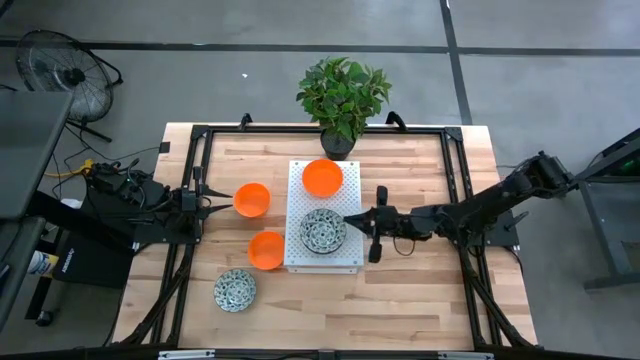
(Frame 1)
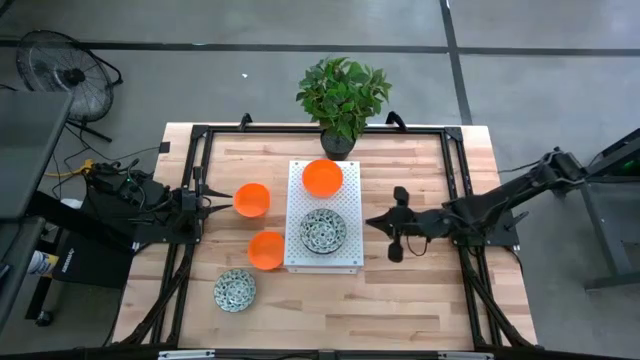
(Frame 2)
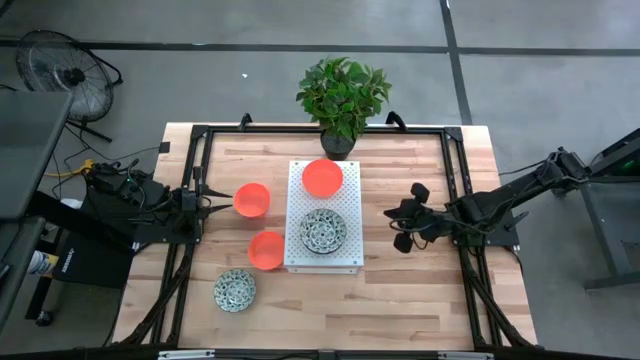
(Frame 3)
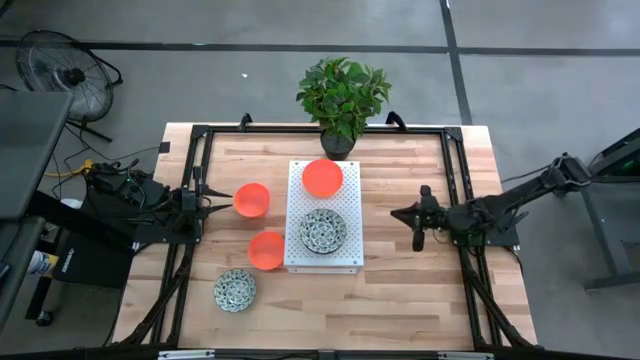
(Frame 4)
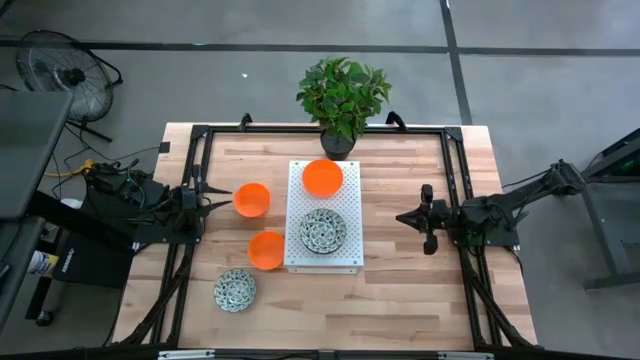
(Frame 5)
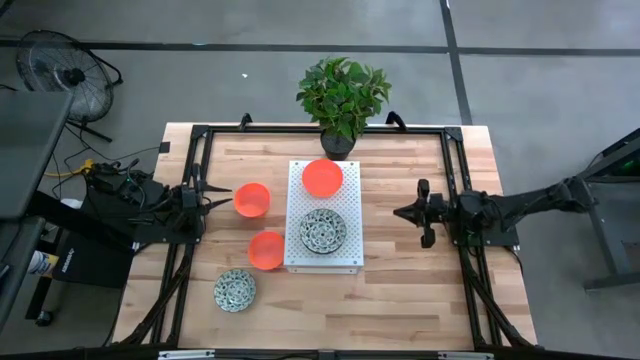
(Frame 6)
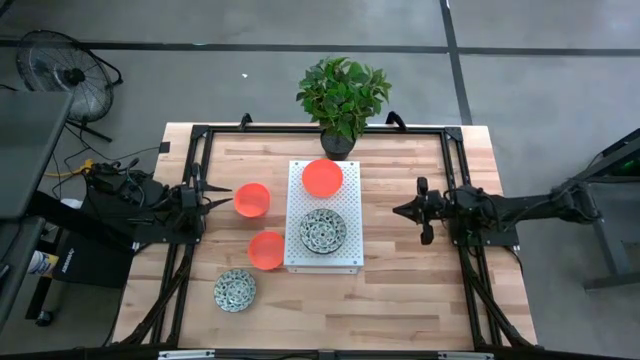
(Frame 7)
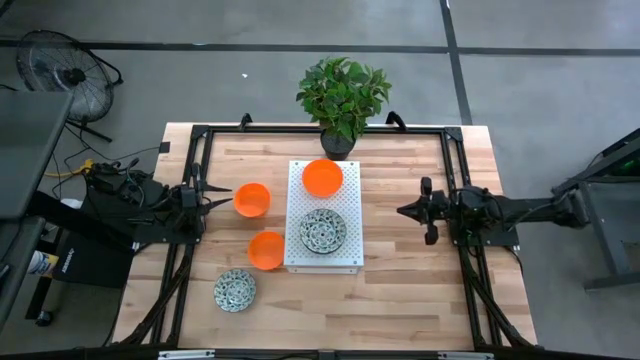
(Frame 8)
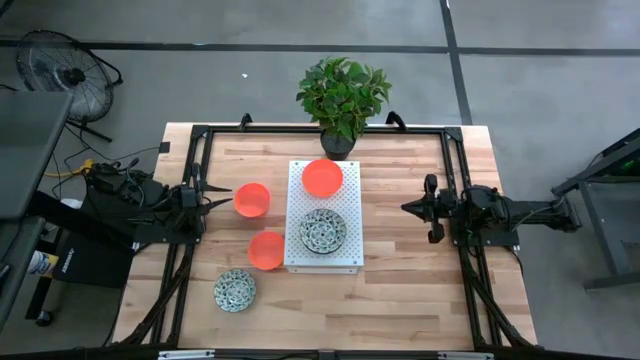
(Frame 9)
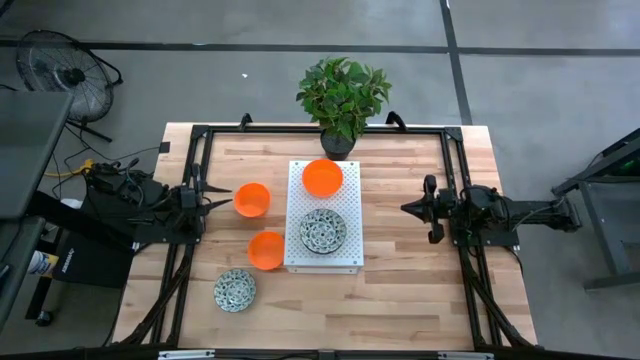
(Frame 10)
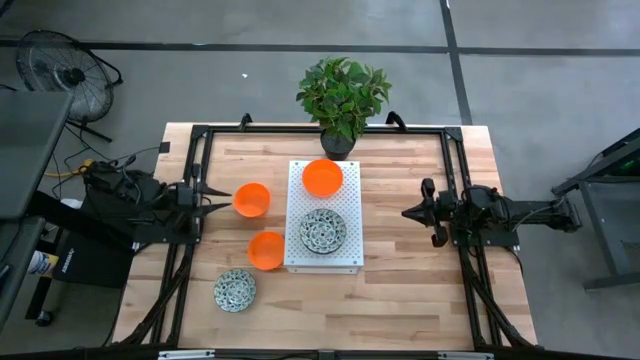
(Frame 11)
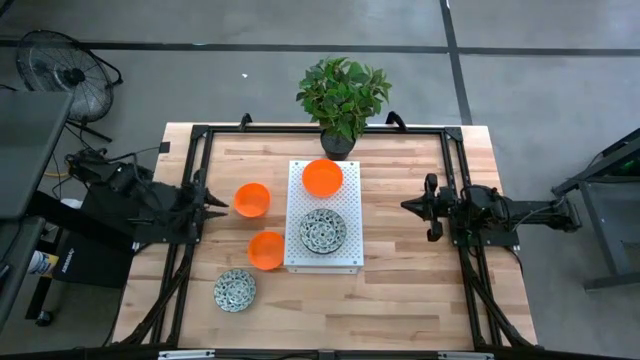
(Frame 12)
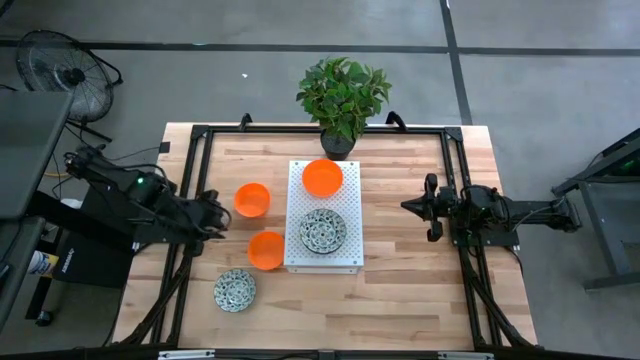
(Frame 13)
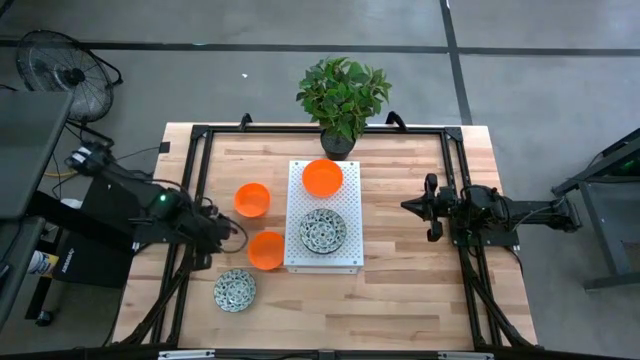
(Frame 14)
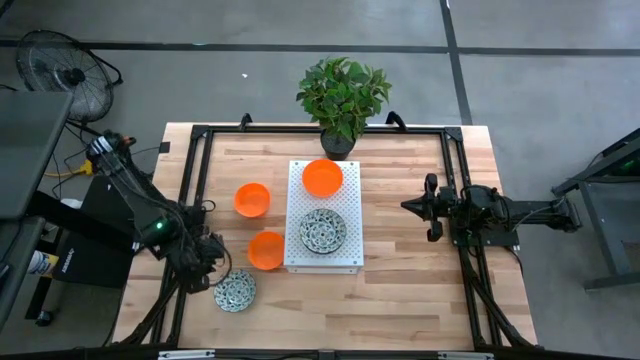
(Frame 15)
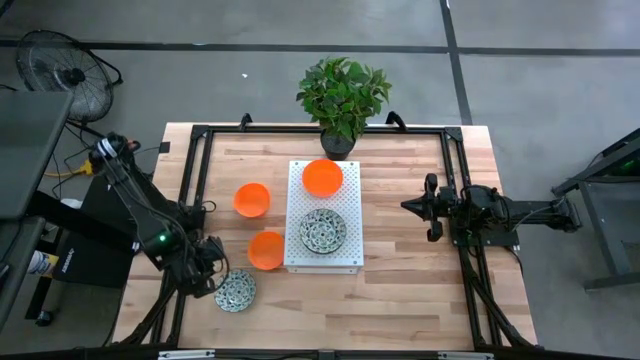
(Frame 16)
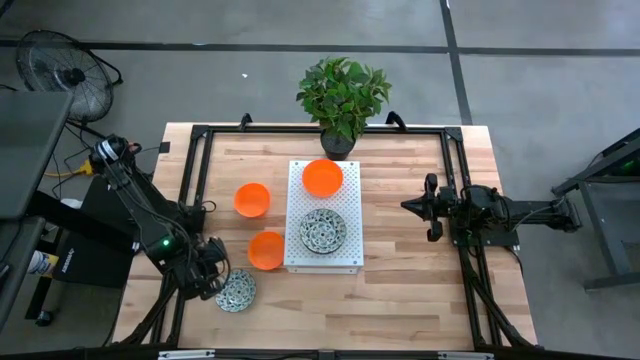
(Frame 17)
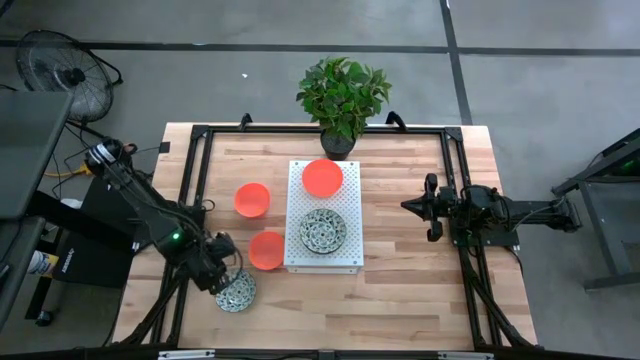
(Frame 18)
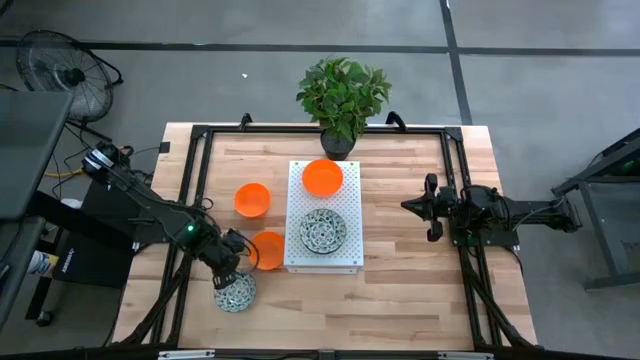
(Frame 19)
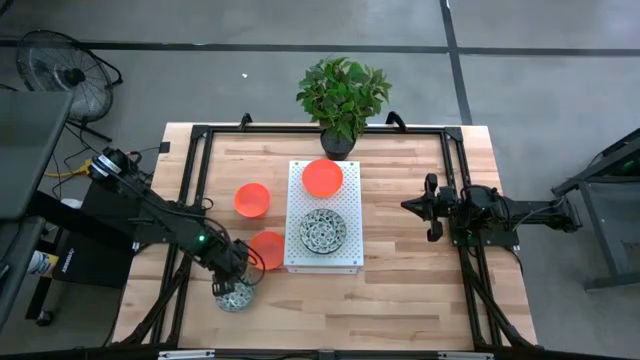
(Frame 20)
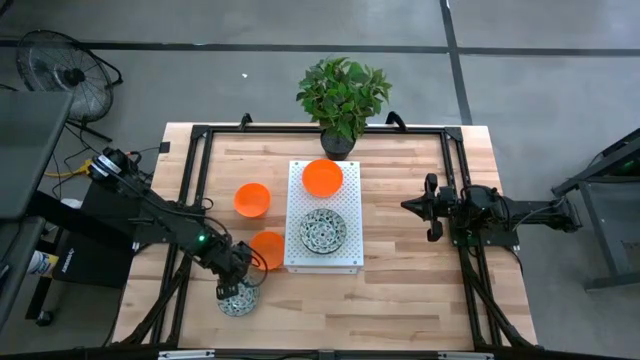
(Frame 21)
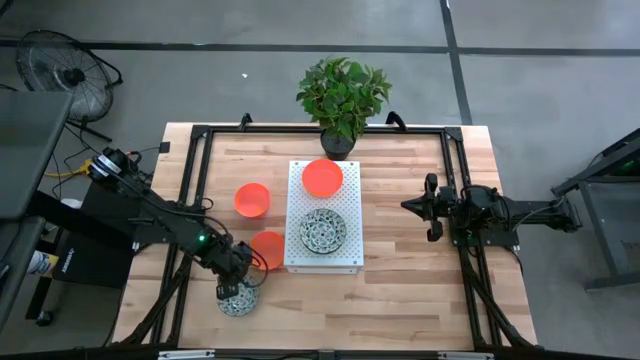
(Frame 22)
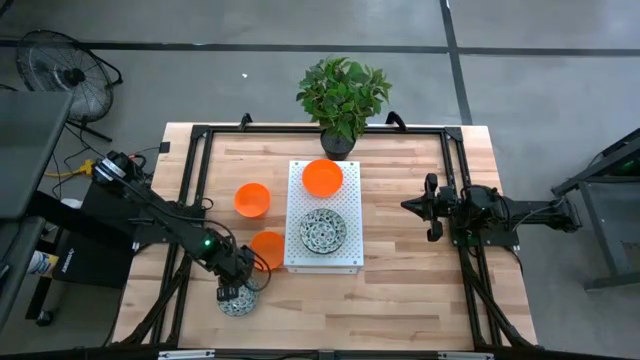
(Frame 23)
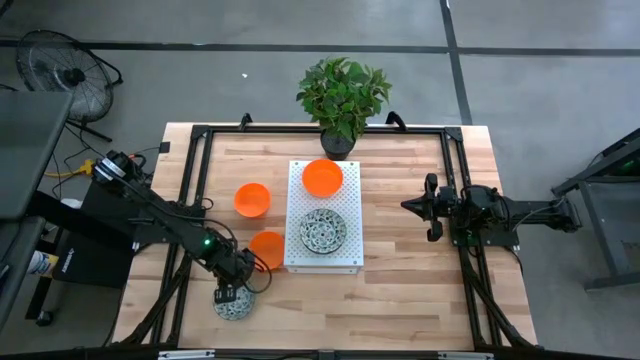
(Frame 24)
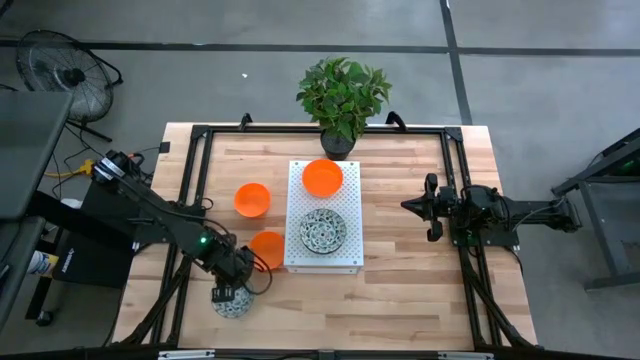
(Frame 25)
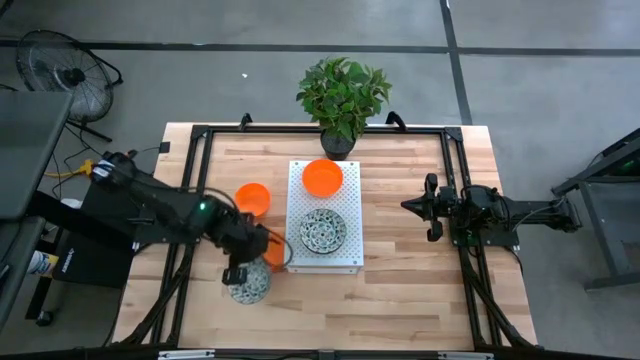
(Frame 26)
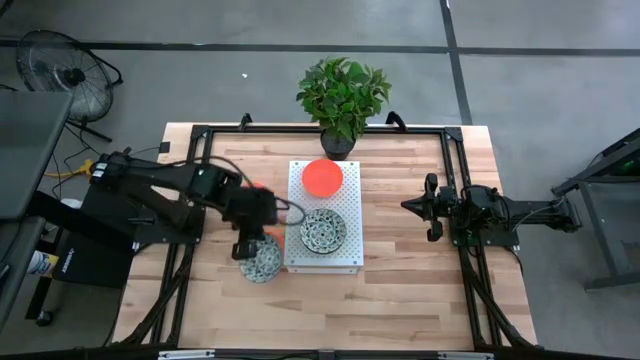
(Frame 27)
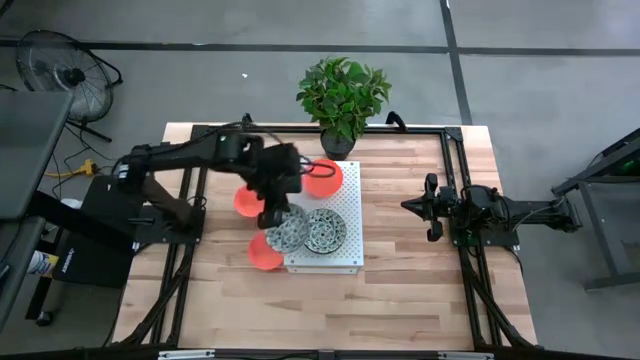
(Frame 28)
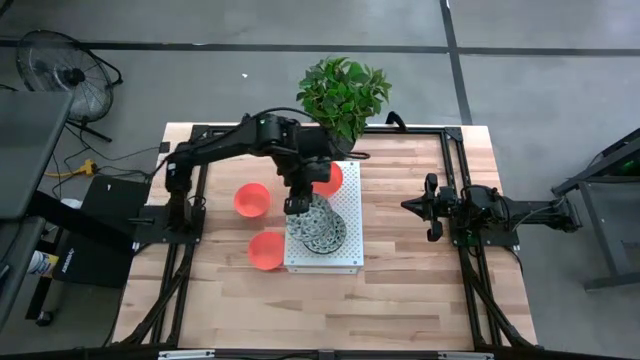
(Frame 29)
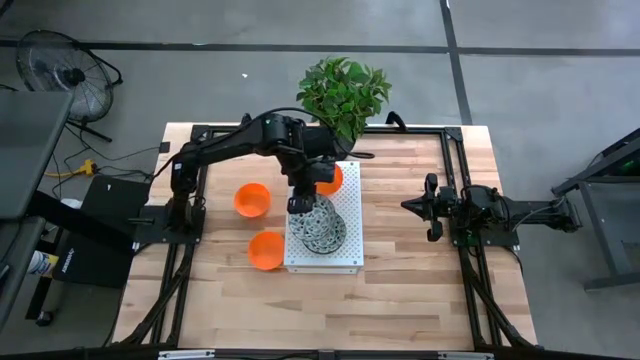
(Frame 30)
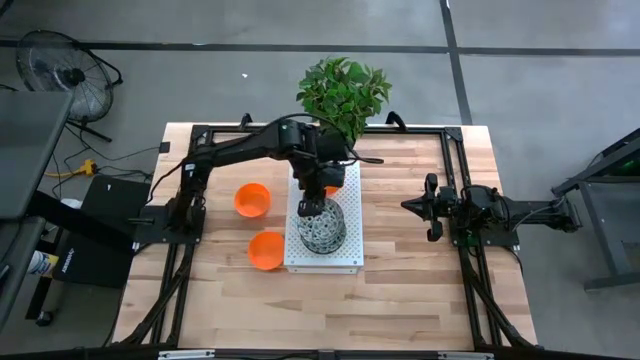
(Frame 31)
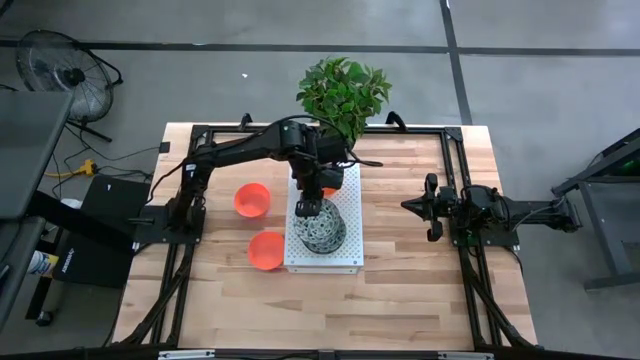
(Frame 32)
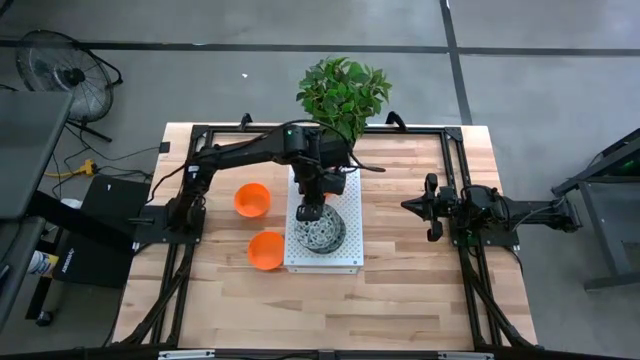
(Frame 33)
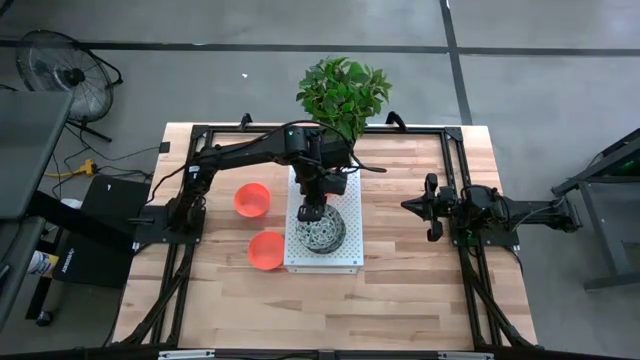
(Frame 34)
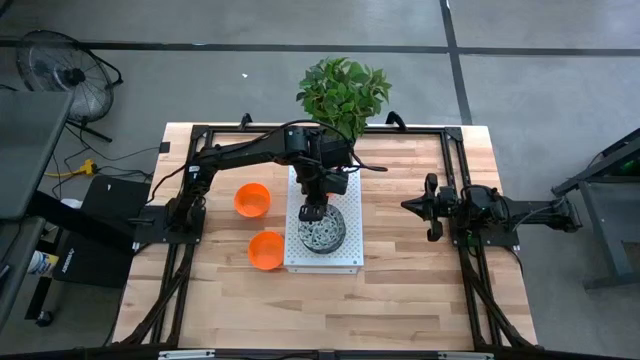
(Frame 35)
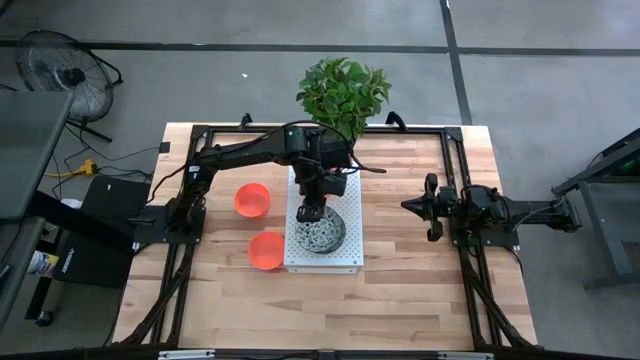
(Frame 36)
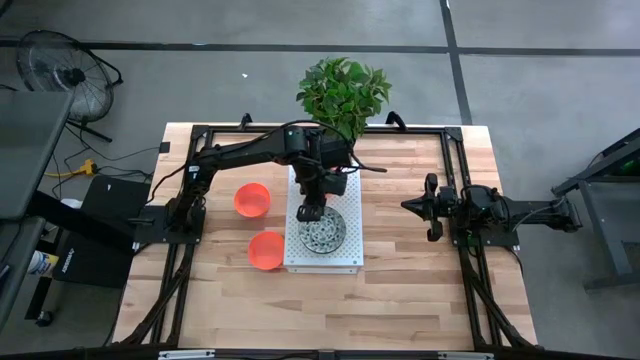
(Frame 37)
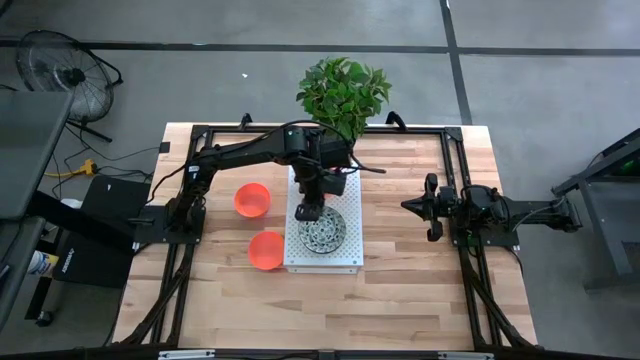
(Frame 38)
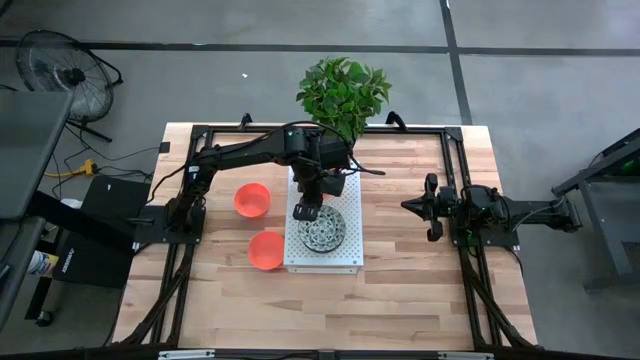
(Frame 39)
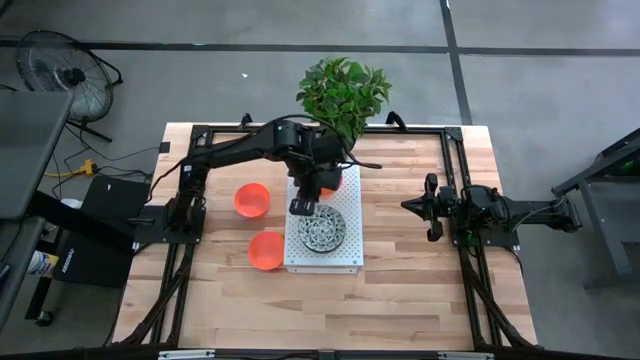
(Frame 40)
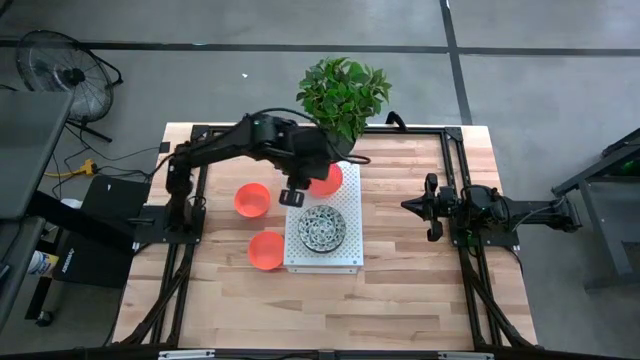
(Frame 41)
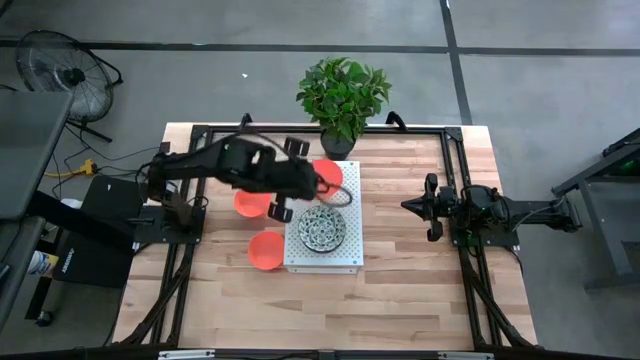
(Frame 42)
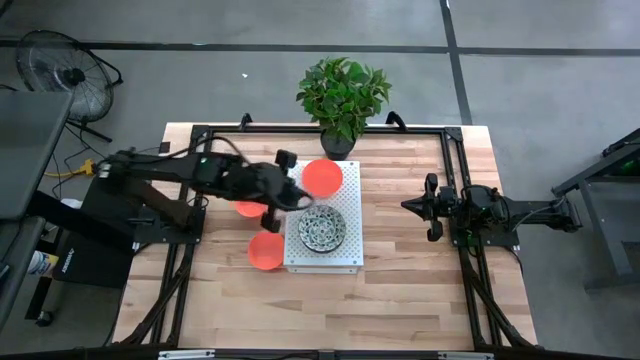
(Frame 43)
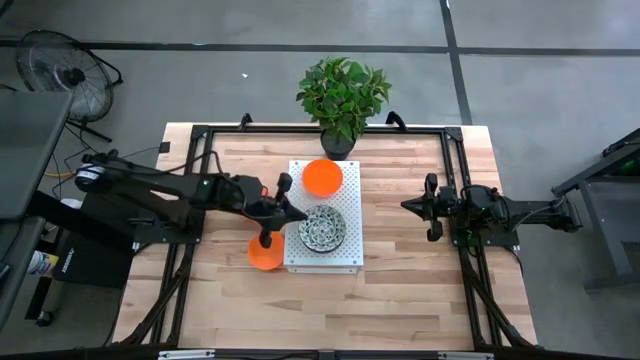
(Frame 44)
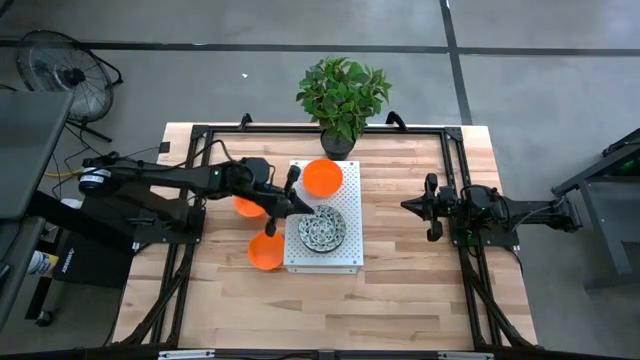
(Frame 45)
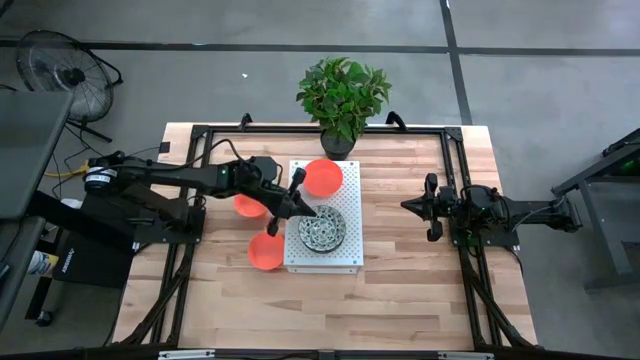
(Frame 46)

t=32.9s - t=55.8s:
Task: Pick & Place Mini bowls
Stack the green white bowl on top of the green white bowl on the shelf
